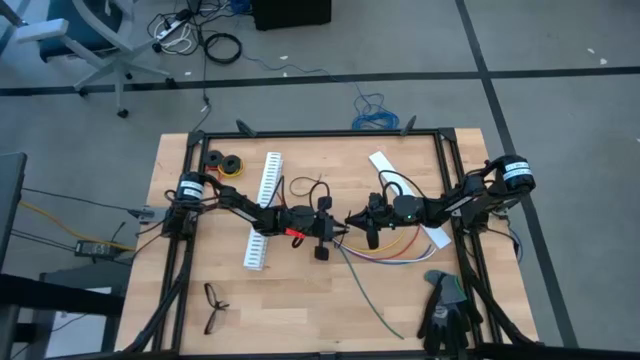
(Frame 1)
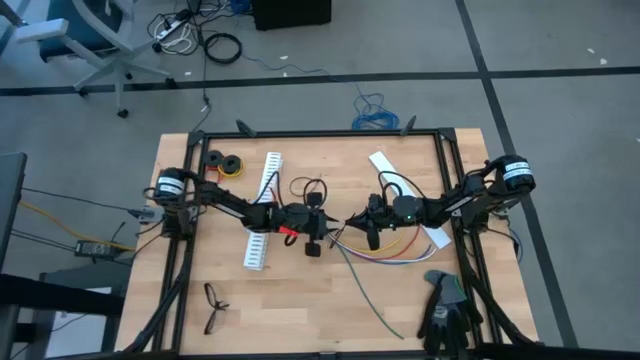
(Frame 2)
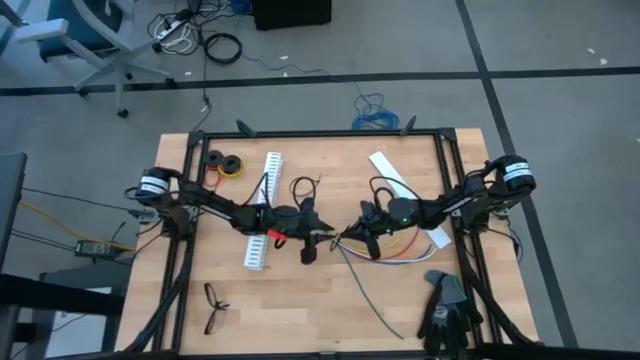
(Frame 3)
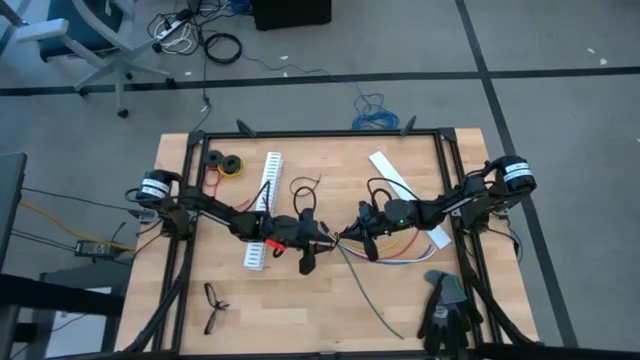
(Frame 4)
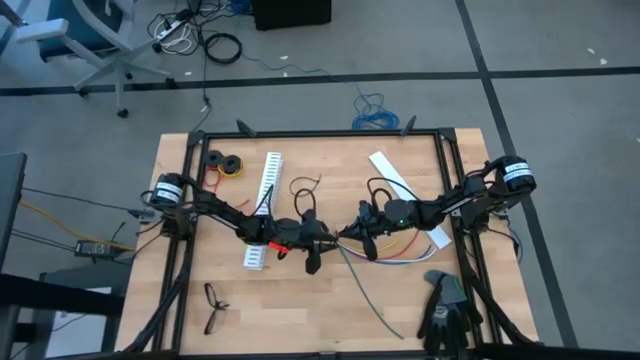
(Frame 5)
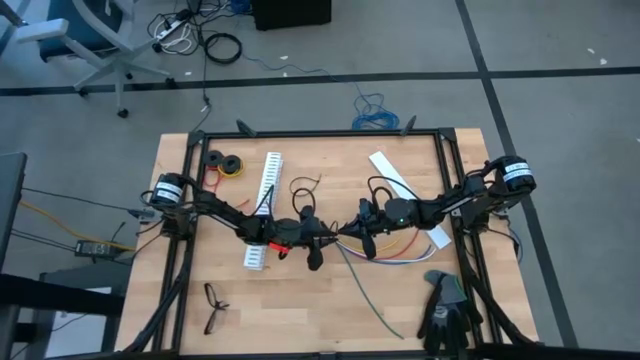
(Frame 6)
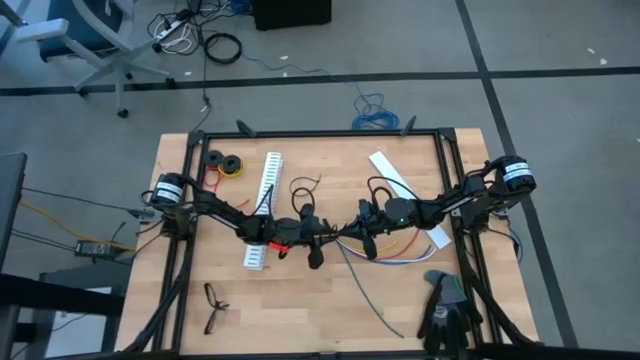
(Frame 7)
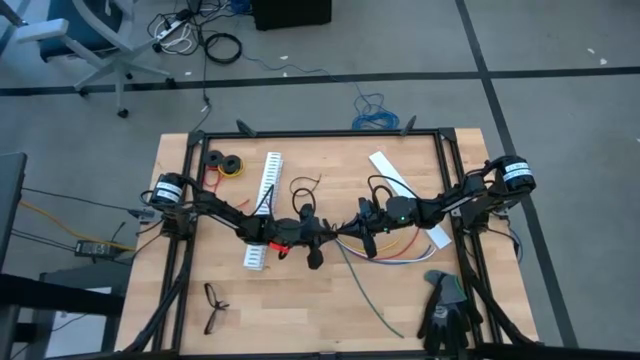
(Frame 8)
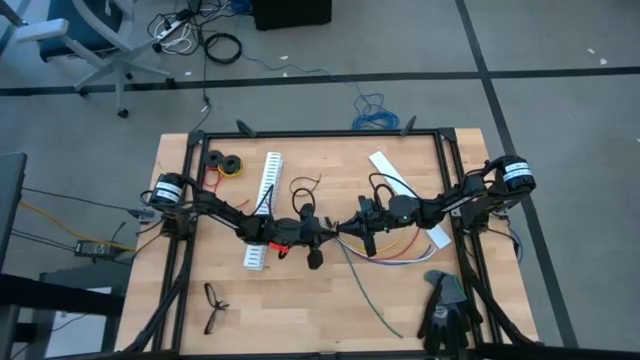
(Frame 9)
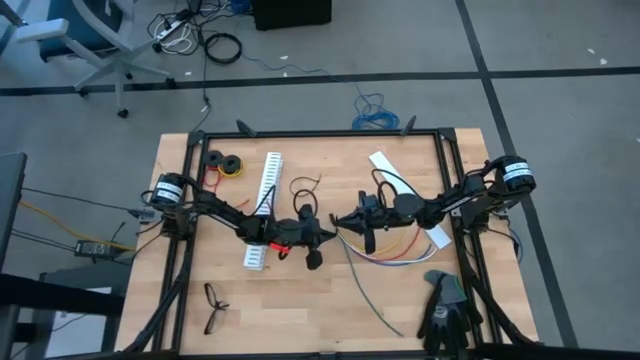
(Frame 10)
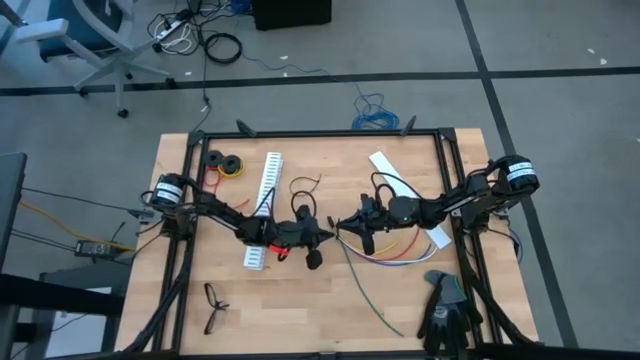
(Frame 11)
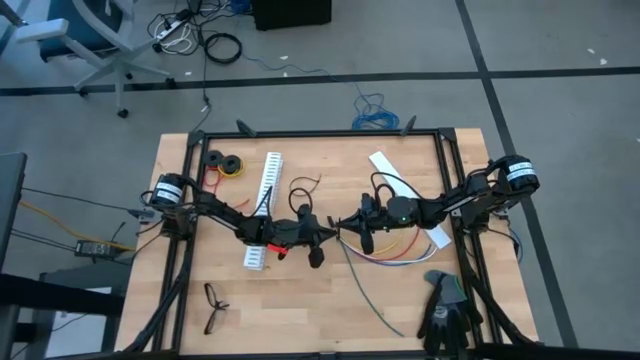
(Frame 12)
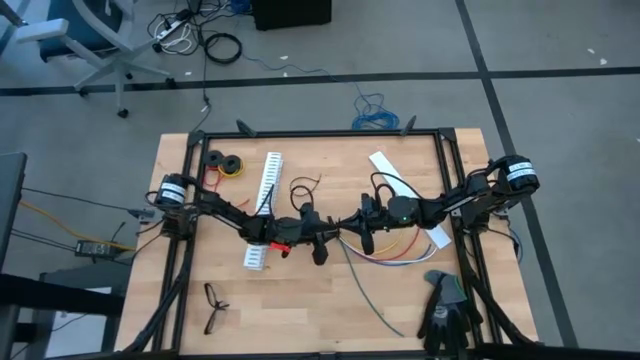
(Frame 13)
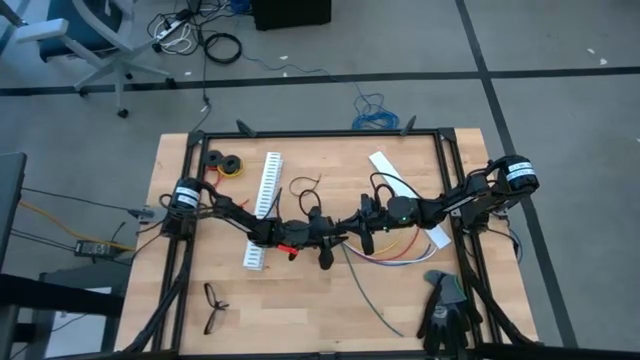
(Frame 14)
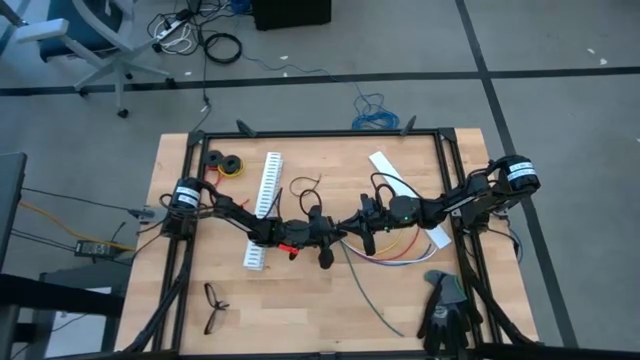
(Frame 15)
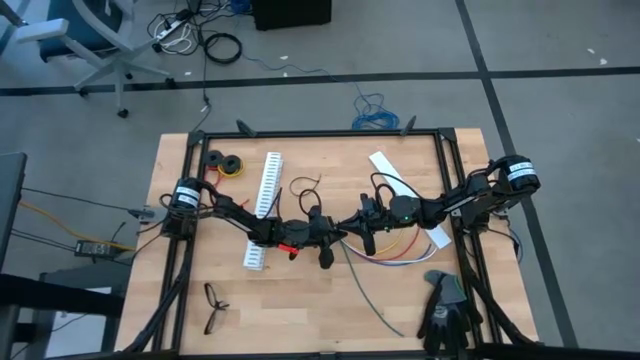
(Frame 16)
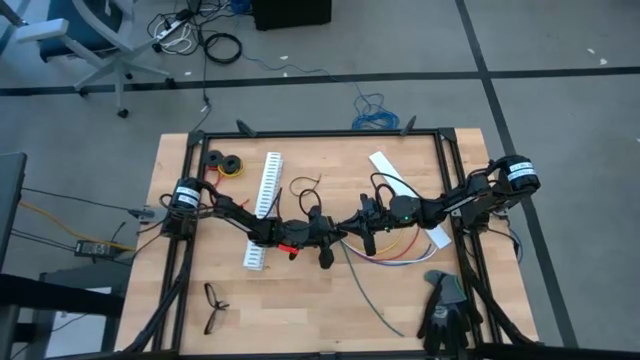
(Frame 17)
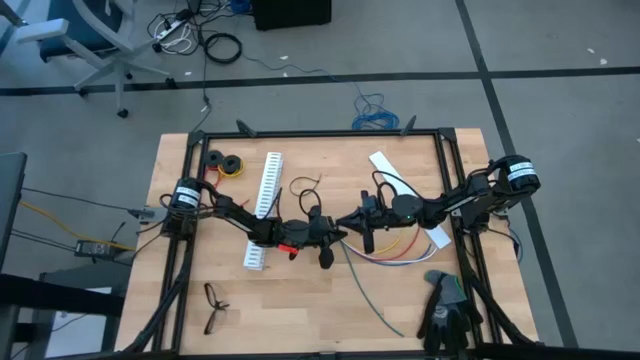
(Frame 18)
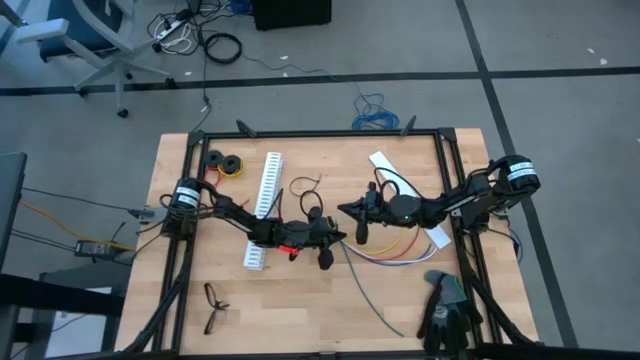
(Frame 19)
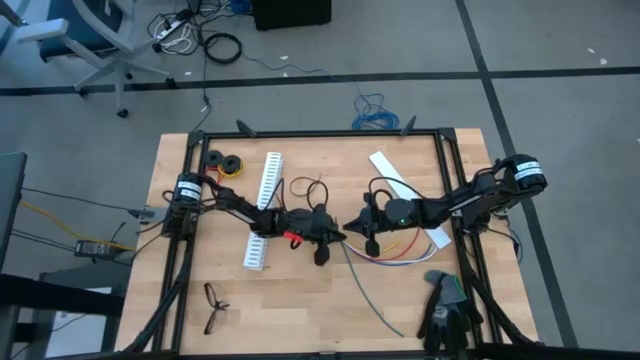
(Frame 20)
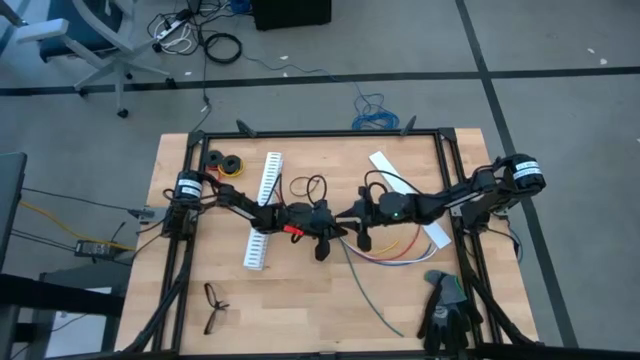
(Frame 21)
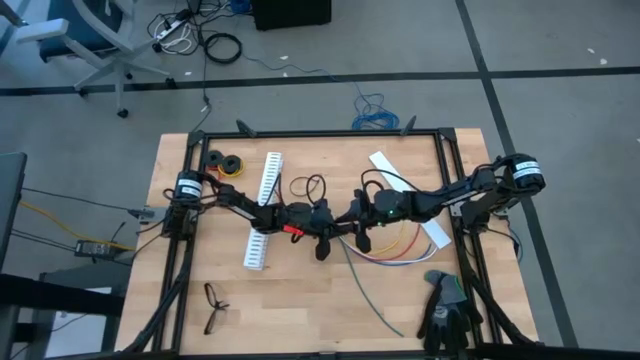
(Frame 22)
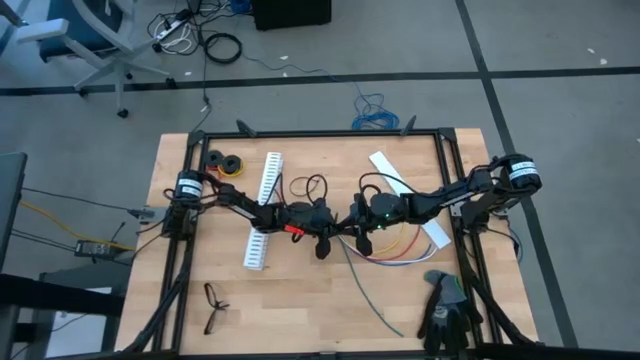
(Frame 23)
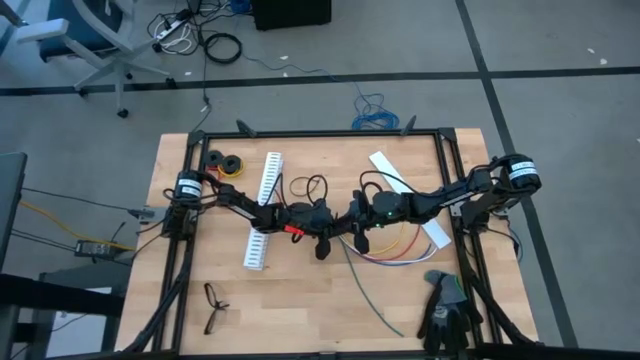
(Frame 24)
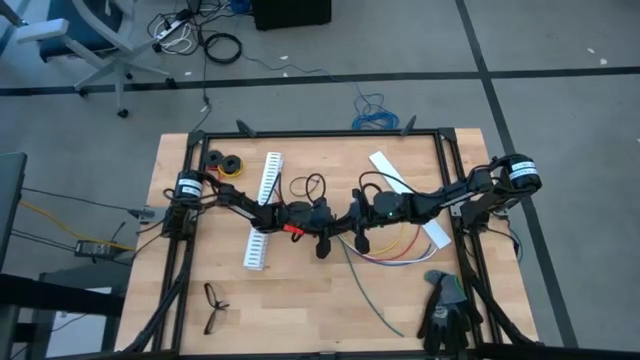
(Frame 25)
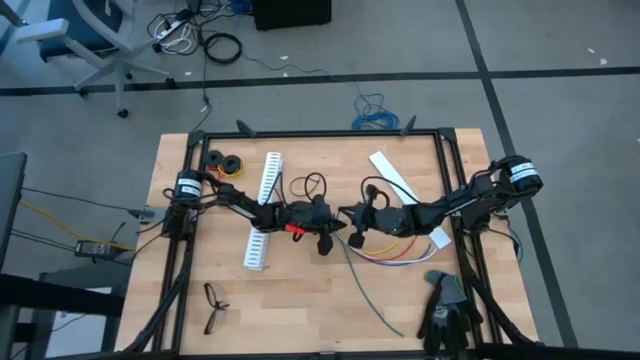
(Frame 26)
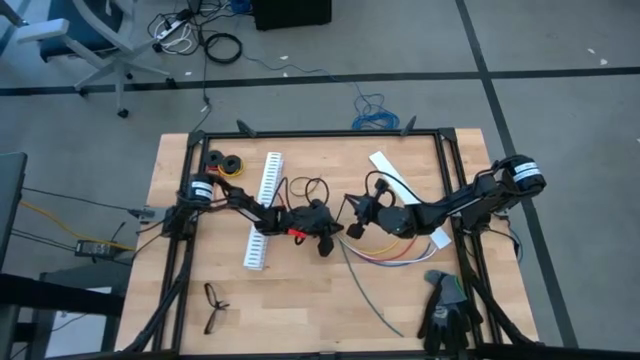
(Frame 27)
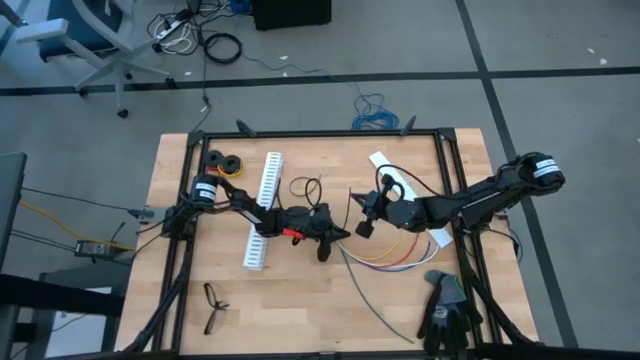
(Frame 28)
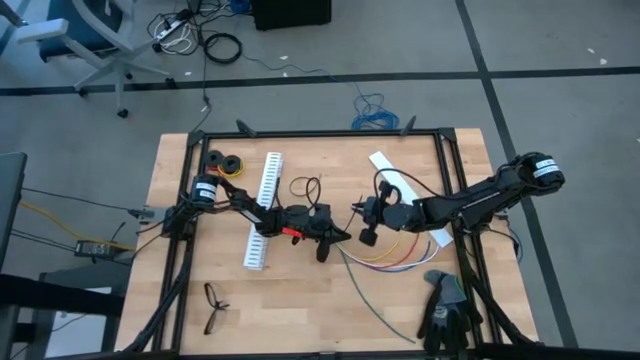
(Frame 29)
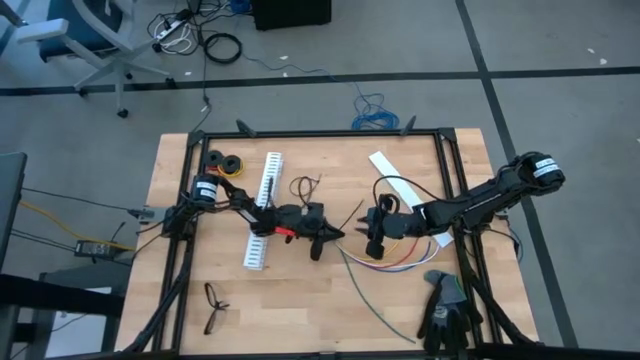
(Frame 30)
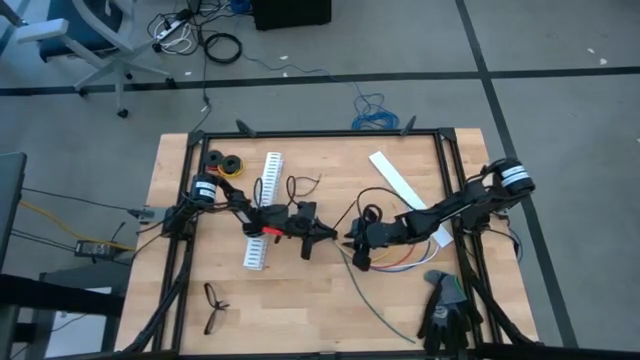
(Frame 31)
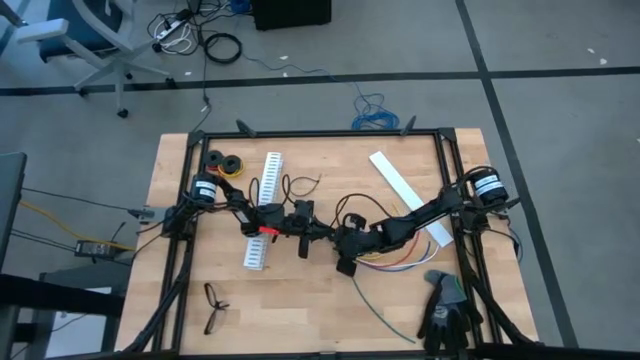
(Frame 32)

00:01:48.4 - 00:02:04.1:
Task: Ziptie cables
Wrap the cable wires with the black zip tie

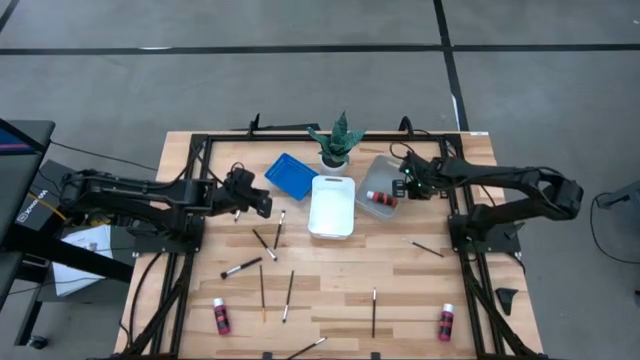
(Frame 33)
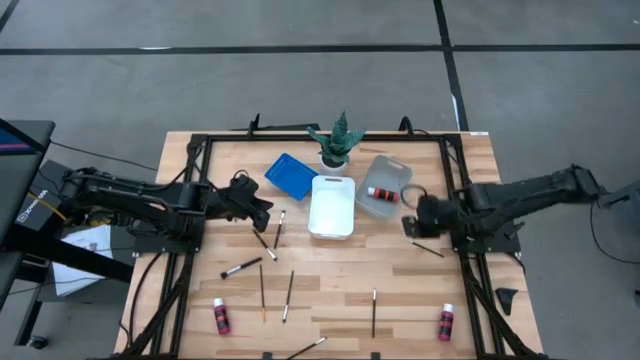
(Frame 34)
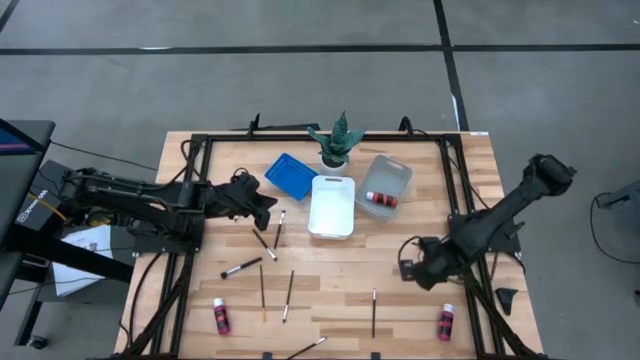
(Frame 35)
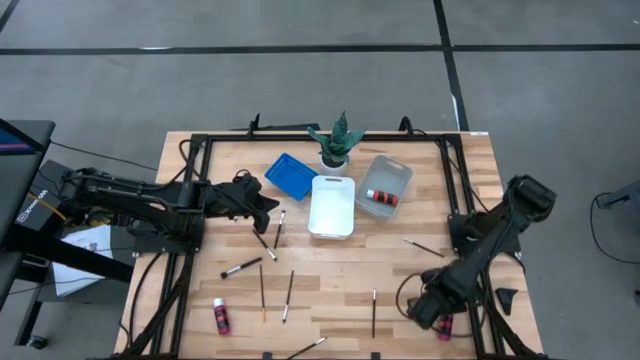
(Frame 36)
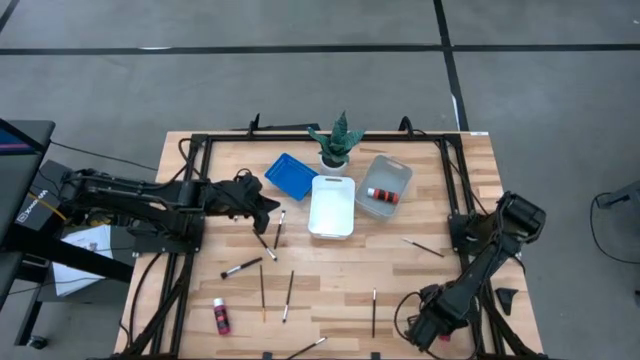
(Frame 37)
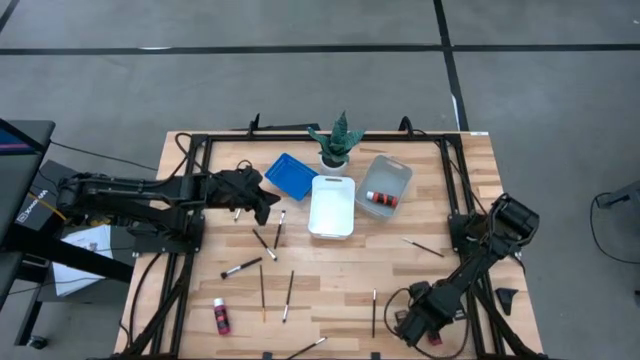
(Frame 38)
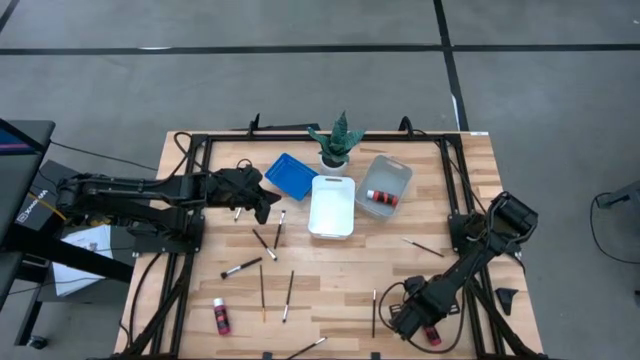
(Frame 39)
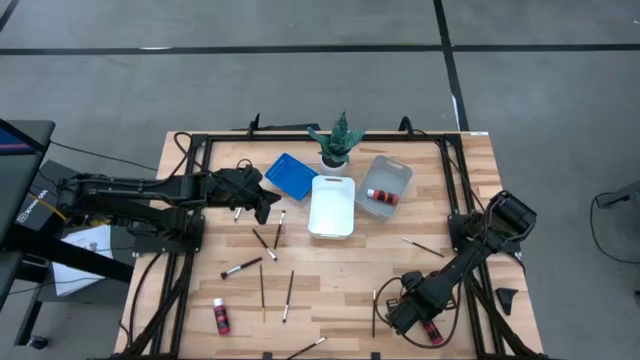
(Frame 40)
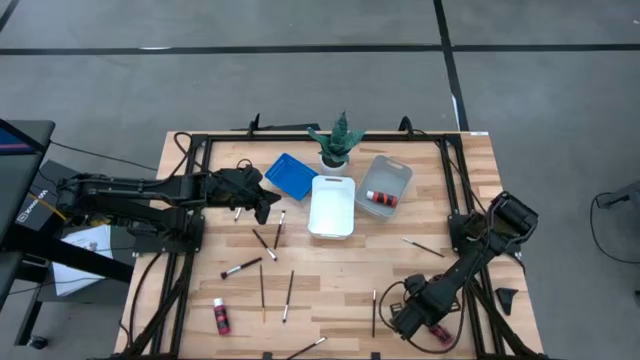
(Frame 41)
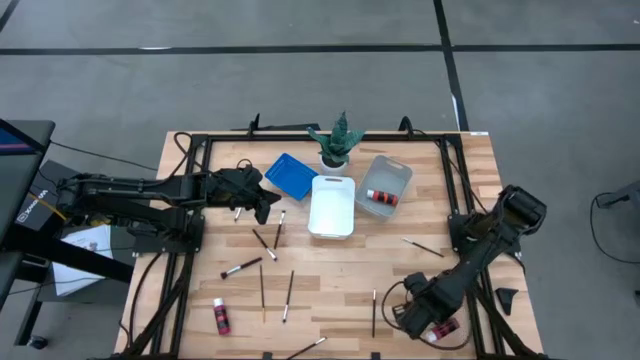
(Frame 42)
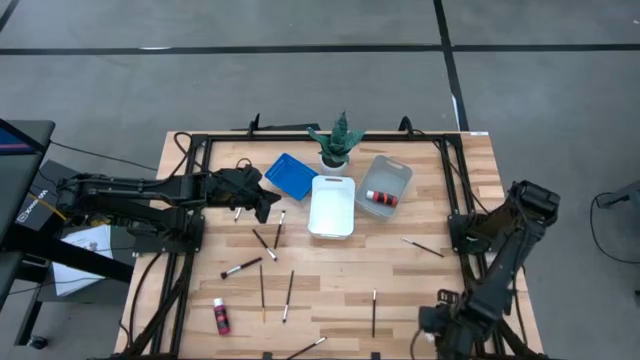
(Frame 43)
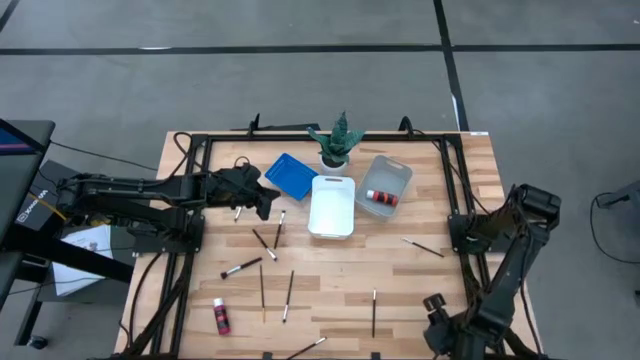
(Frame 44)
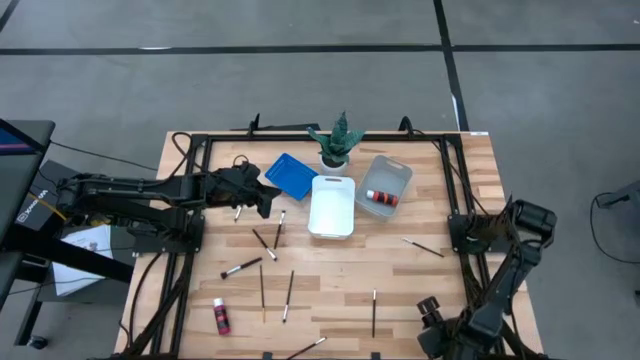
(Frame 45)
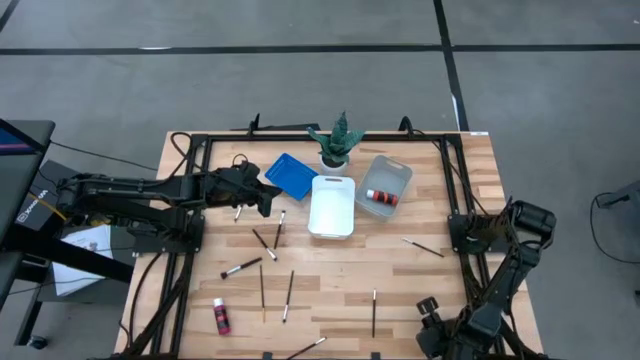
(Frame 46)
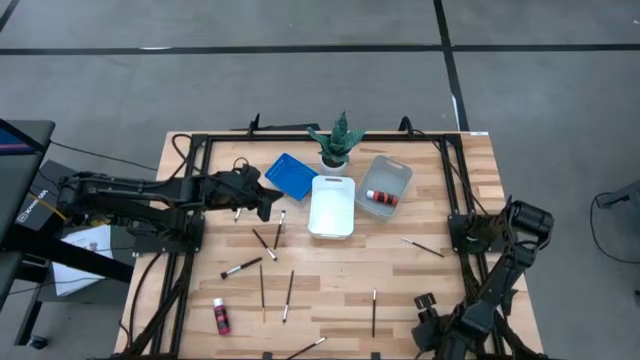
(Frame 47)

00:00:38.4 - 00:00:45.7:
Task: Pick & Place Paint Supplies
Put the pink paint bottle into the gray bin
